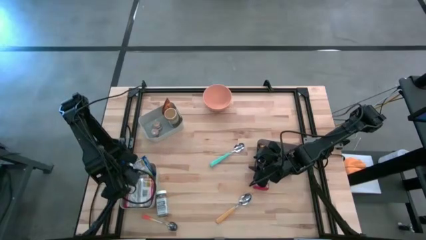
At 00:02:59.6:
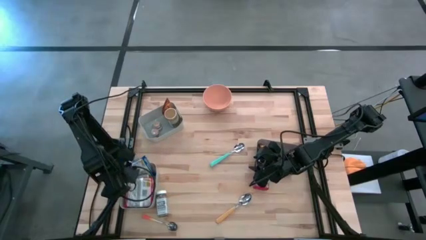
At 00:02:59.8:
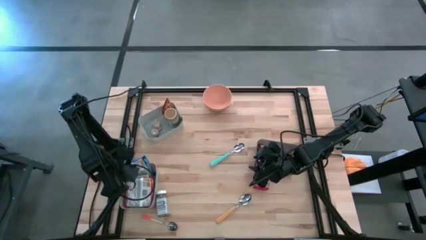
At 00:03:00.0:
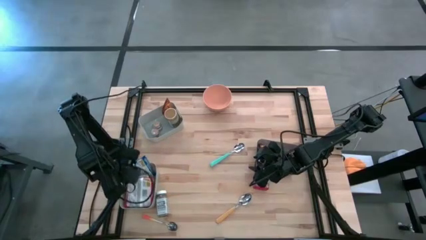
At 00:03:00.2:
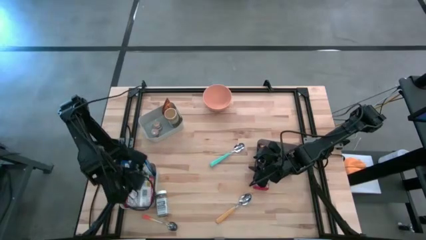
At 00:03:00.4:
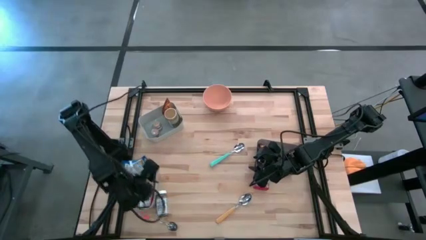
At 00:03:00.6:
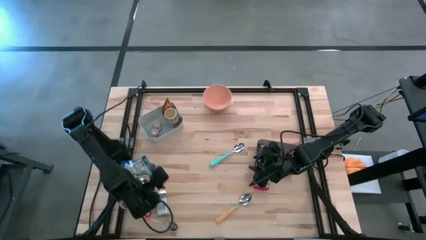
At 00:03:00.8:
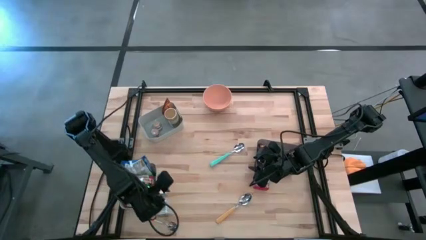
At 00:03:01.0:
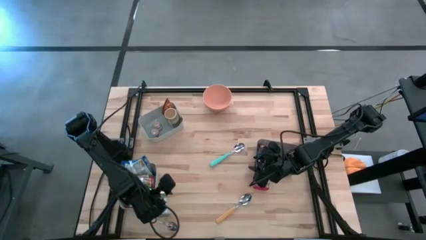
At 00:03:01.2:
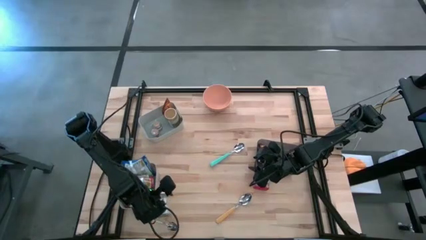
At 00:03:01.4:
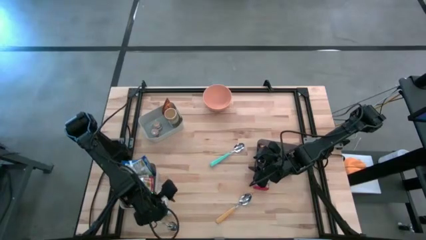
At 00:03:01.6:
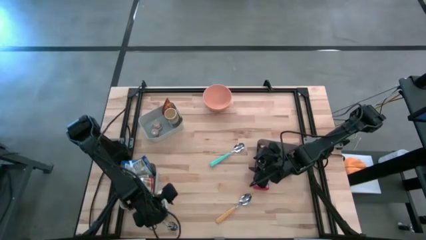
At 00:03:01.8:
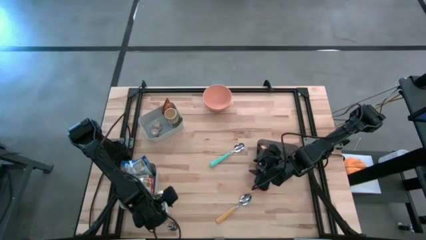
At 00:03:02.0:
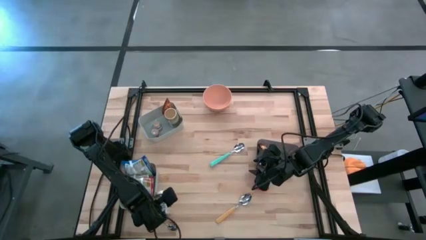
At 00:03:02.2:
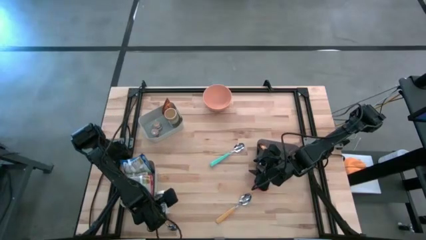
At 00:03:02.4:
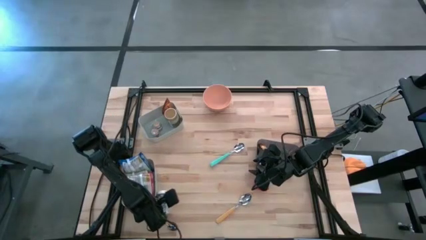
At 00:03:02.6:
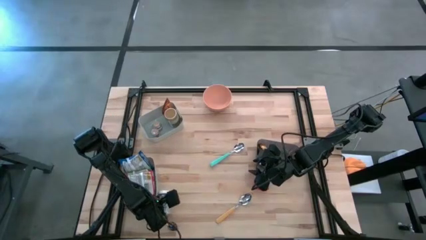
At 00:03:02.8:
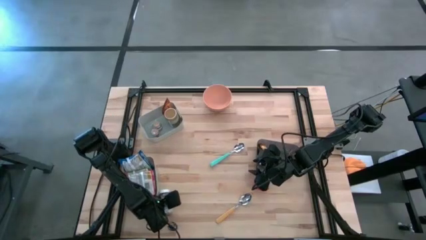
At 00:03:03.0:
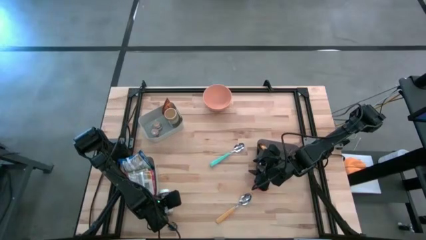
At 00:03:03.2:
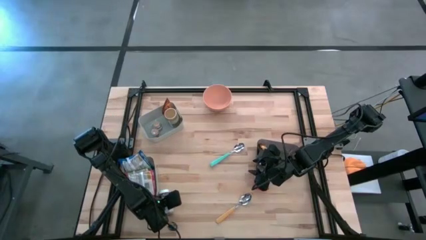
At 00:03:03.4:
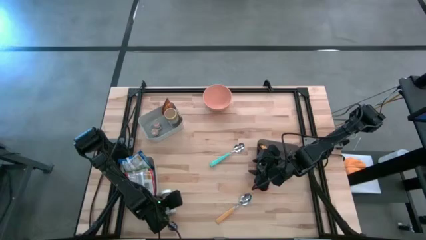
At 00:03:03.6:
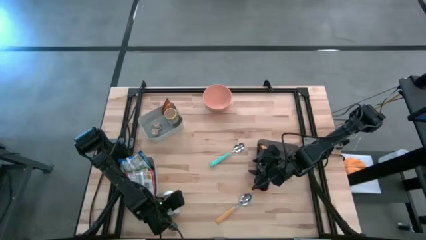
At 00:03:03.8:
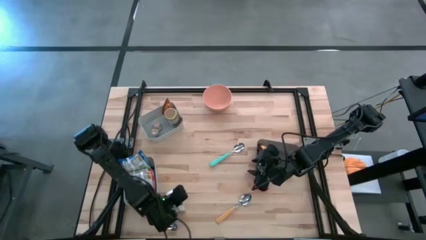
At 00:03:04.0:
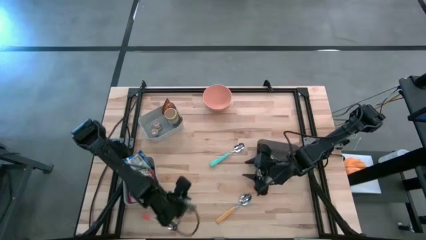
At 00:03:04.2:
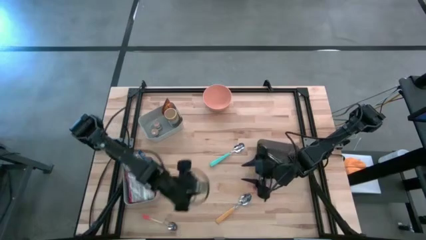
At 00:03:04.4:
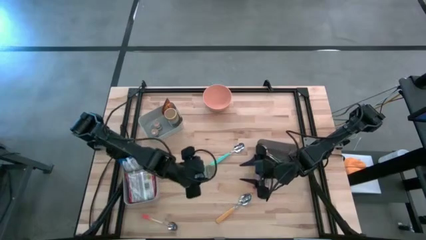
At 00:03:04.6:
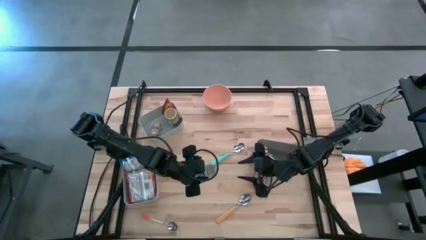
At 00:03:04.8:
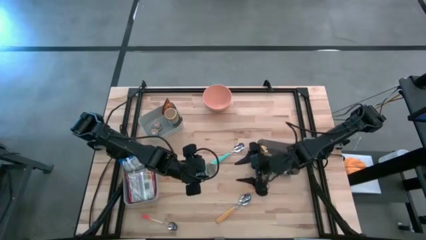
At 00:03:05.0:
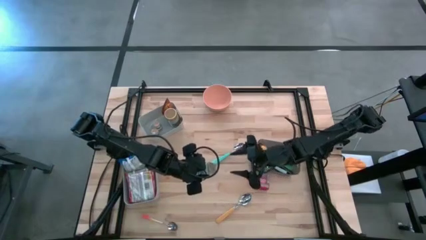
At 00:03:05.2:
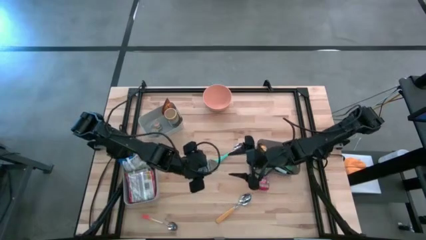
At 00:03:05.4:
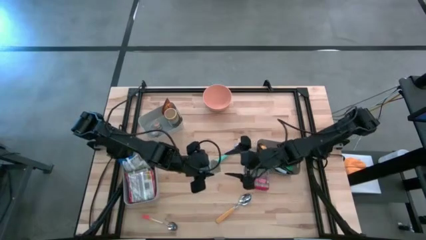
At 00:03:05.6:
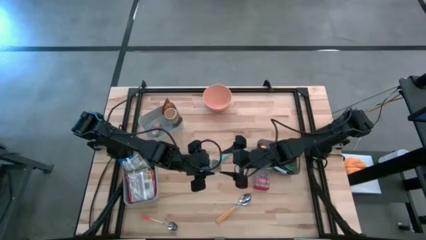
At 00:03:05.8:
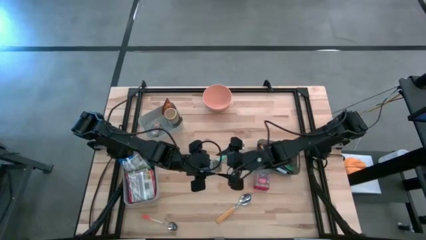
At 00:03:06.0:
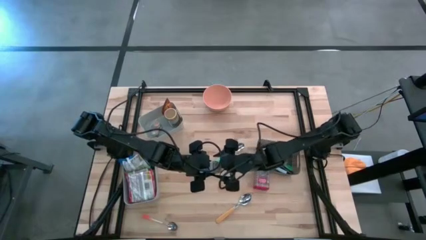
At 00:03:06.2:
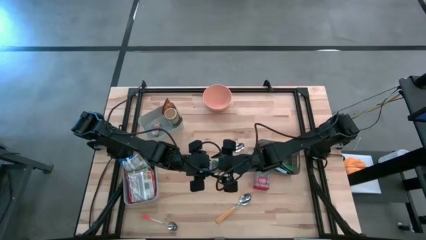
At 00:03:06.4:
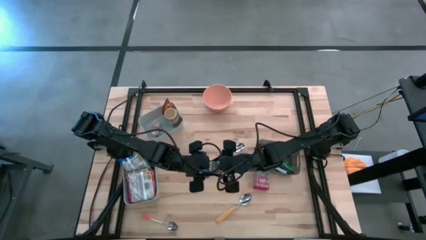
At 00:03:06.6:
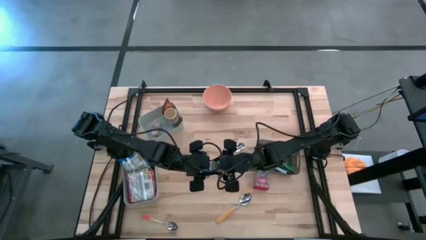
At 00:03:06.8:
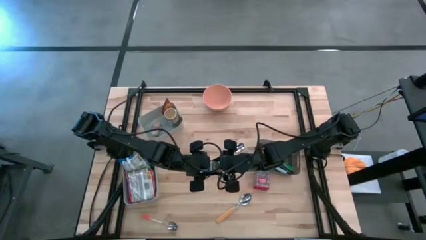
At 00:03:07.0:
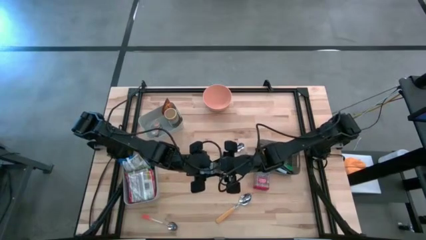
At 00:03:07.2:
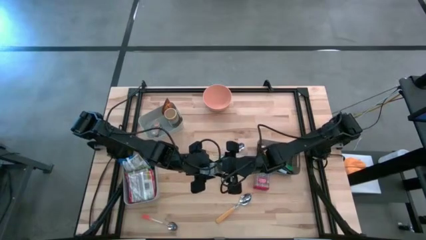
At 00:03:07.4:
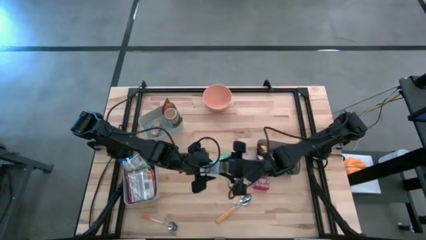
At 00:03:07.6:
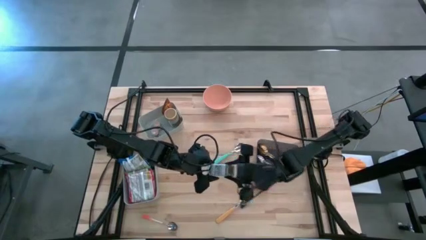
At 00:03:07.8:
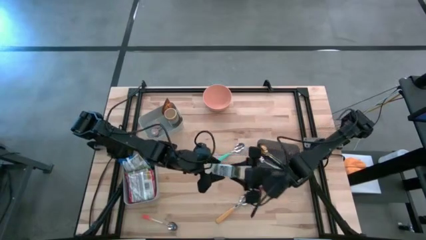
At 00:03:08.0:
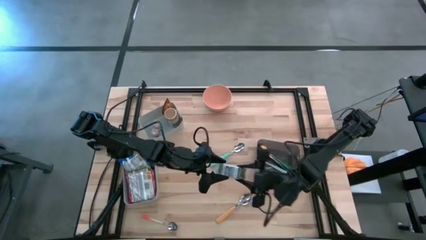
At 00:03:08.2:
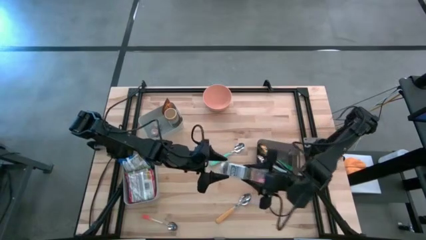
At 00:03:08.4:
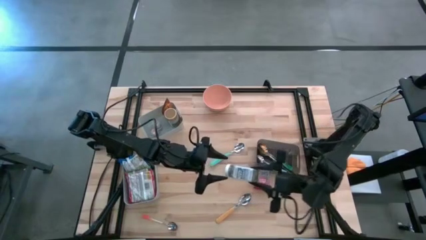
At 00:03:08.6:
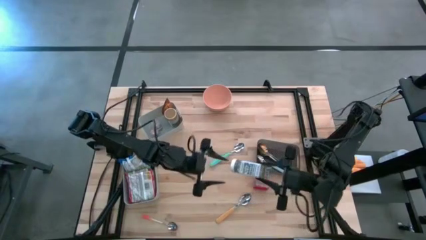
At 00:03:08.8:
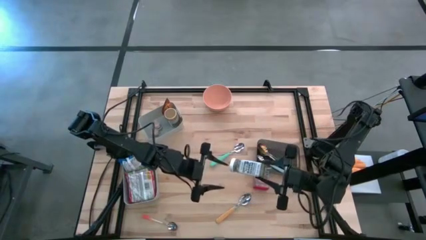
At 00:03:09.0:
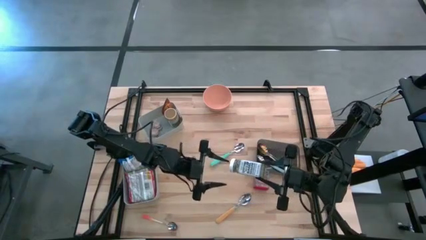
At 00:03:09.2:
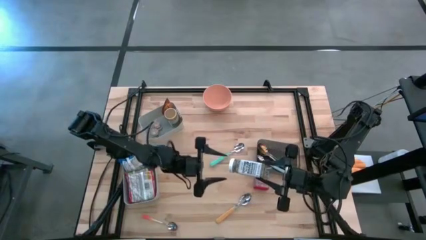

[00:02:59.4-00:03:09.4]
Put the bagel seasoning bottle into the top gray bin

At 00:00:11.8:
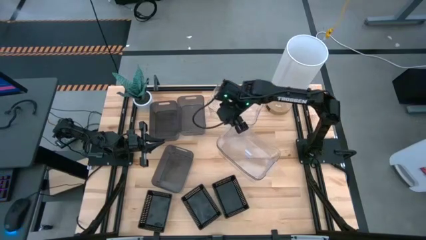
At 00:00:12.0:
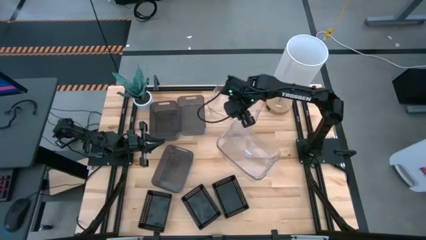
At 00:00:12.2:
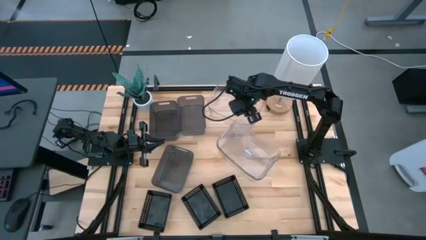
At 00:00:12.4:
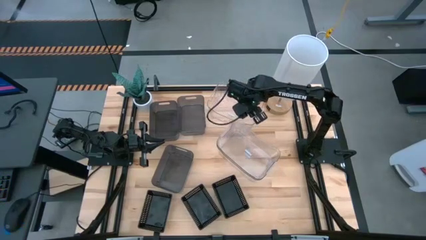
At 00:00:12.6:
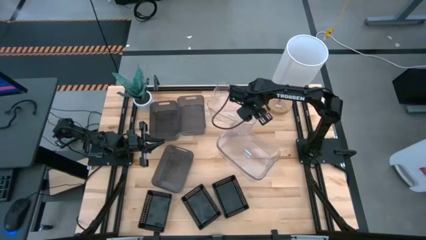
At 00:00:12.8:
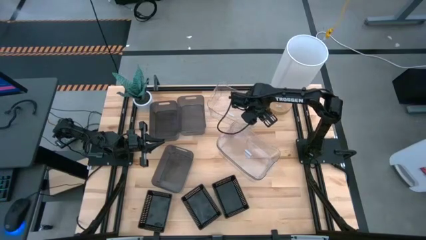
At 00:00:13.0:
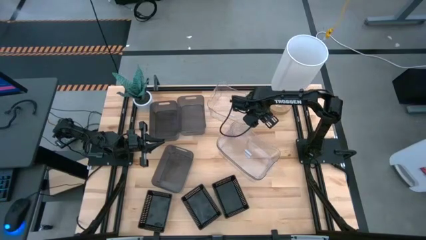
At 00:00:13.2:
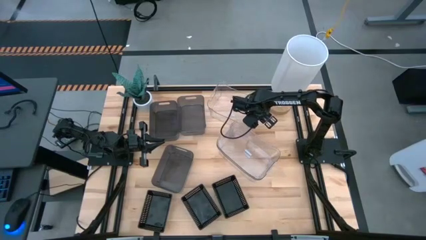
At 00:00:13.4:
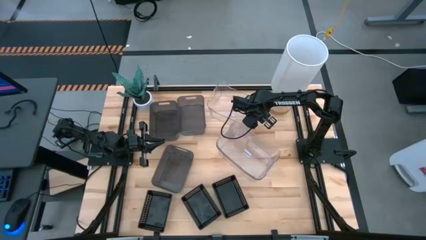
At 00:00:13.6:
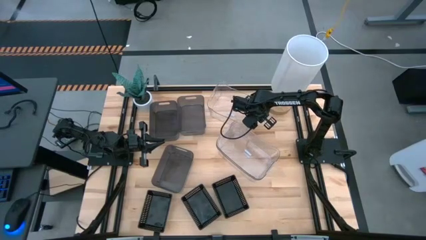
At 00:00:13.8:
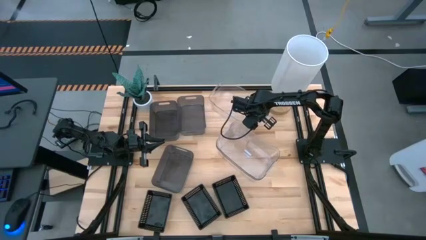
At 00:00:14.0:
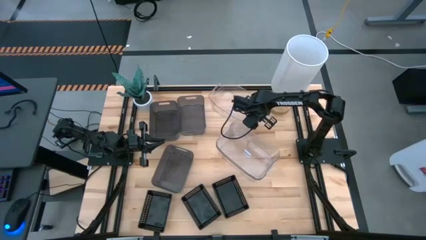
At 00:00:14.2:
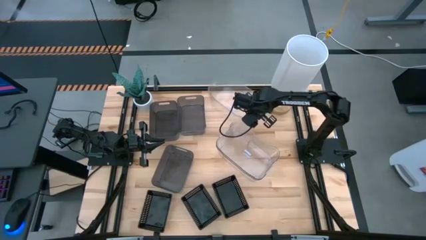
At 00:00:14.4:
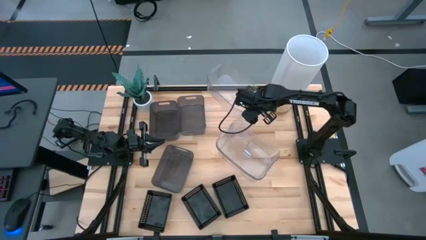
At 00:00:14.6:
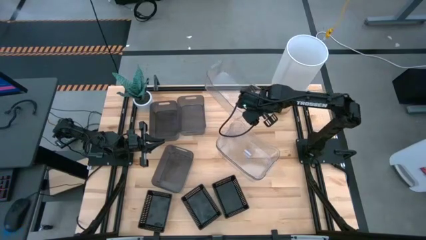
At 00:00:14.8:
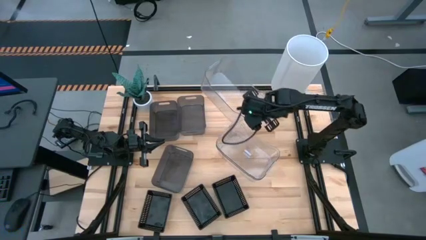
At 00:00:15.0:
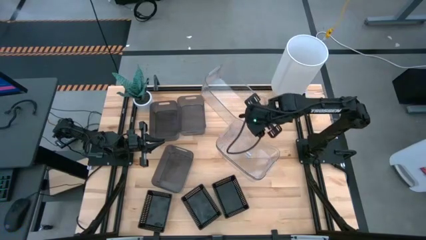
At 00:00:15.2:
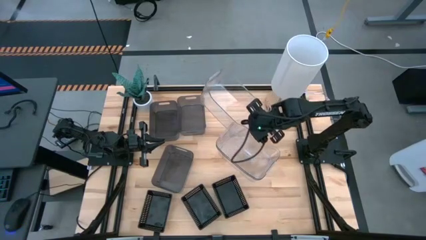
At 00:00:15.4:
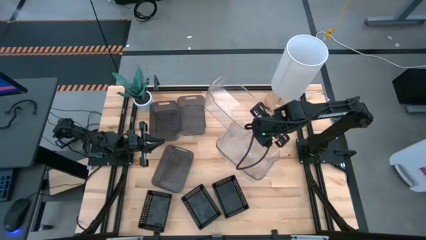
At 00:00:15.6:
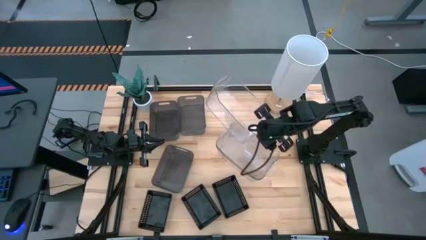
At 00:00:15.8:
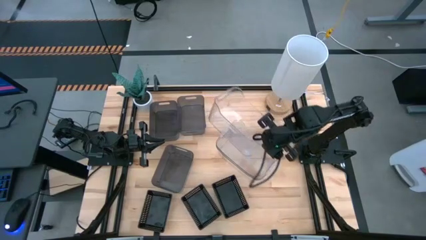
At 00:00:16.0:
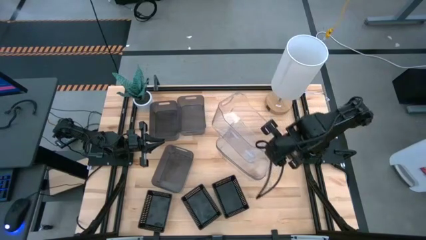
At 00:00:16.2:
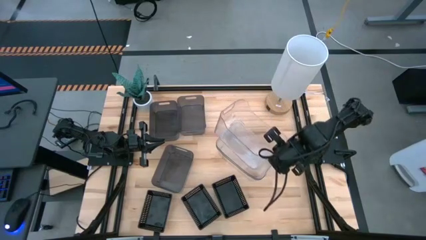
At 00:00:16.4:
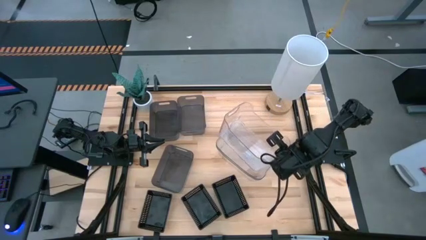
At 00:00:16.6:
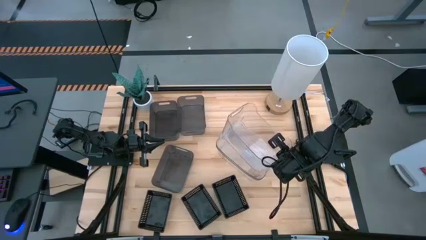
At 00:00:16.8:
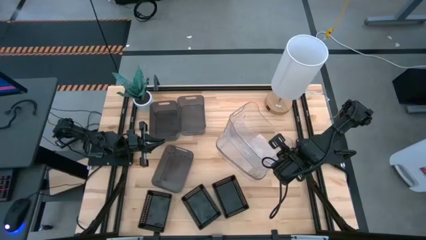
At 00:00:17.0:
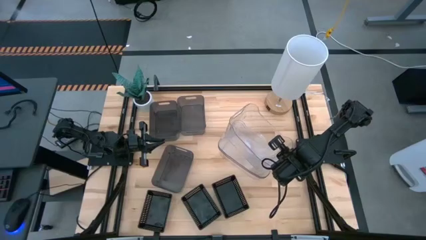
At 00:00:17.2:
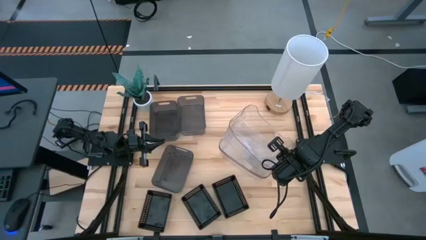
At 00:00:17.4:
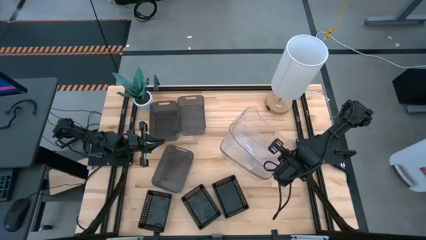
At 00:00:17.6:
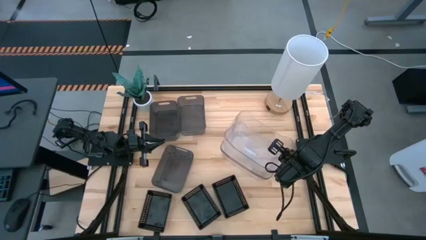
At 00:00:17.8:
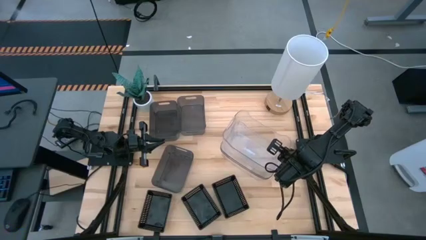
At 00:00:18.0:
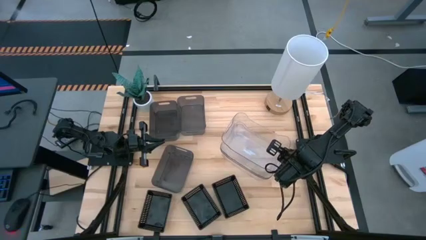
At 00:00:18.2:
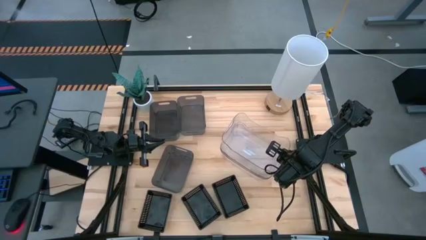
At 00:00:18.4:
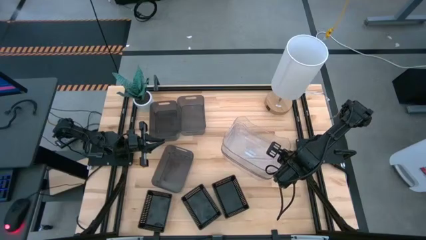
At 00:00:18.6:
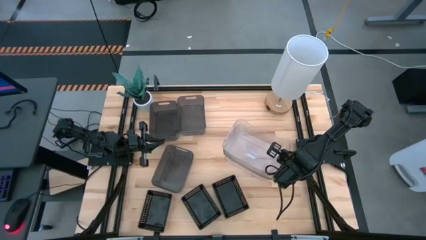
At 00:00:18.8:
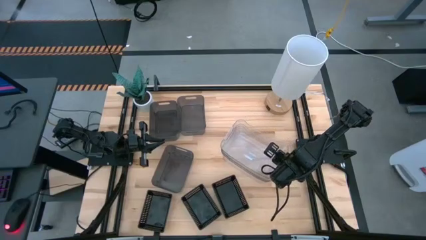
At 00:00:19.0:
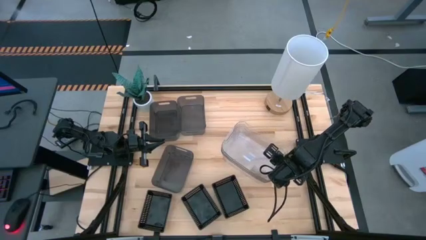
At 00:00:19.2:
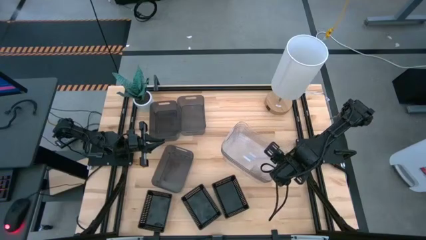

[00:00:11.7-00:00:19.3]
Stack the top transparent bin on the bottom transparent bins
